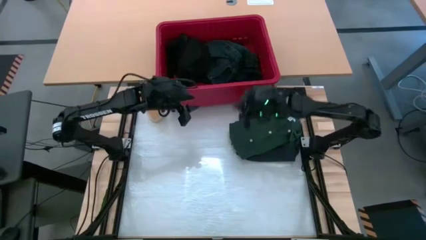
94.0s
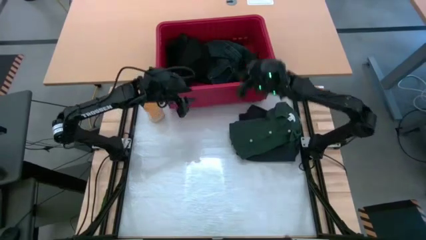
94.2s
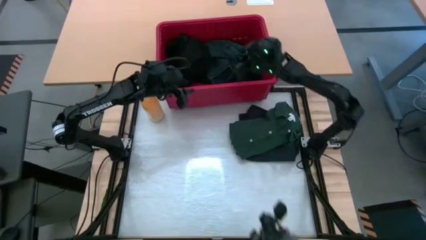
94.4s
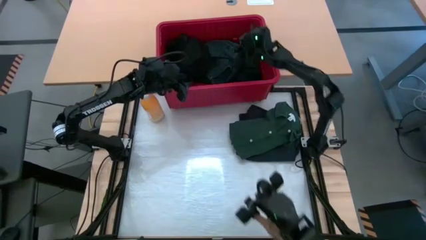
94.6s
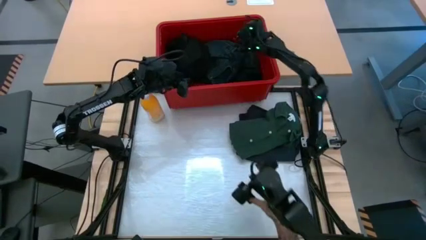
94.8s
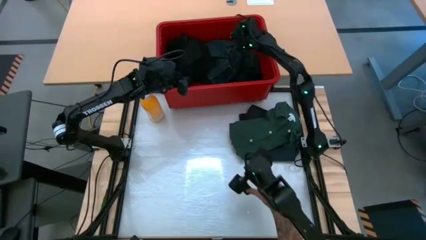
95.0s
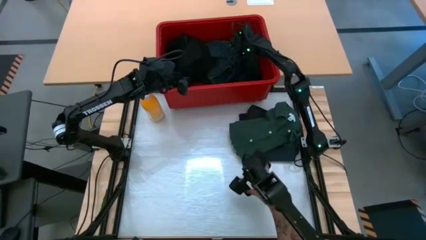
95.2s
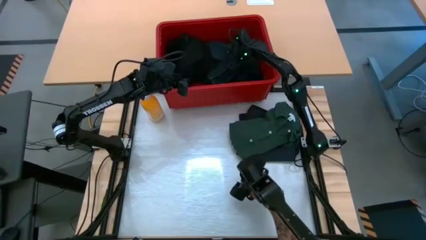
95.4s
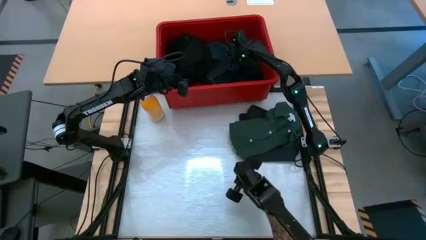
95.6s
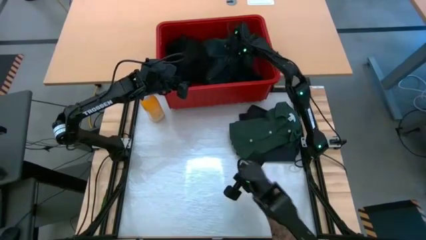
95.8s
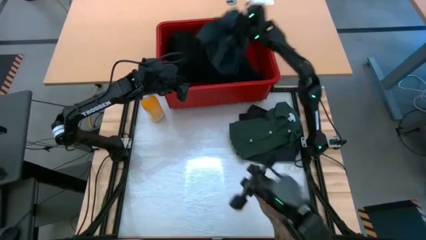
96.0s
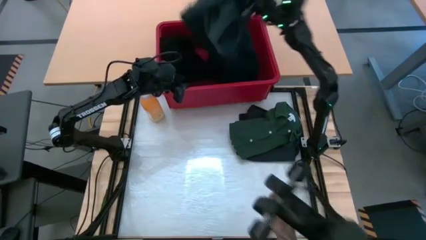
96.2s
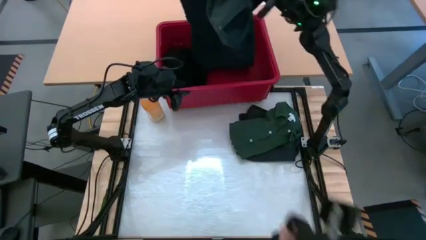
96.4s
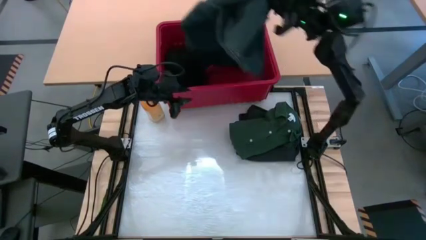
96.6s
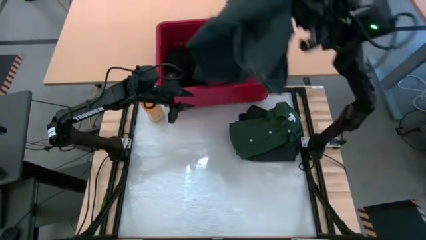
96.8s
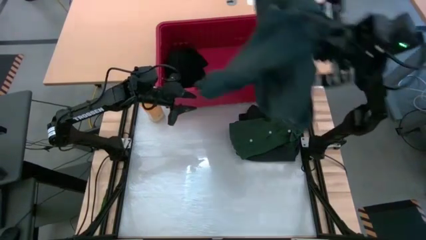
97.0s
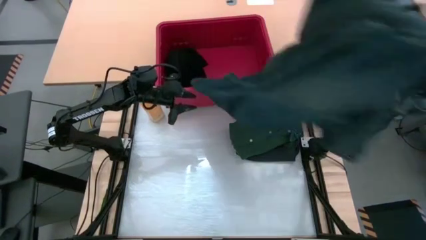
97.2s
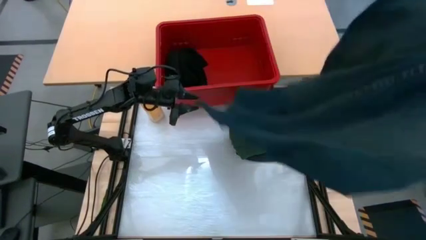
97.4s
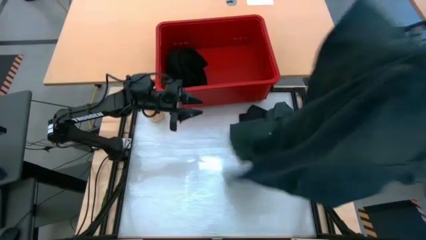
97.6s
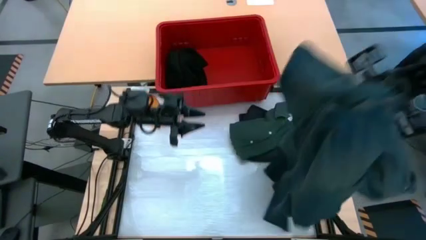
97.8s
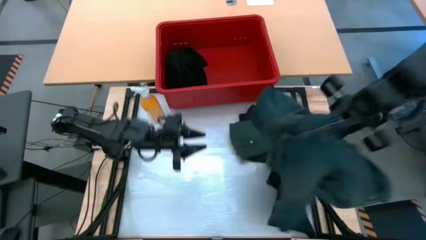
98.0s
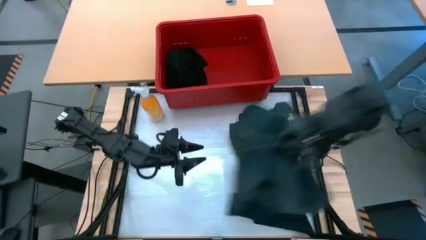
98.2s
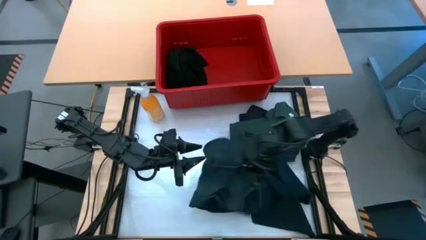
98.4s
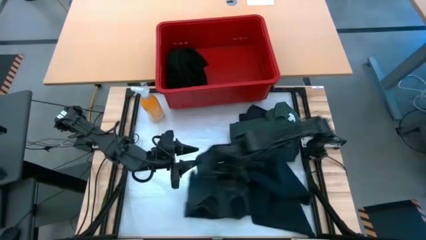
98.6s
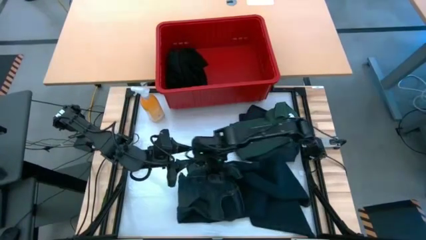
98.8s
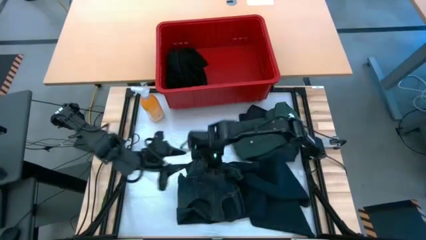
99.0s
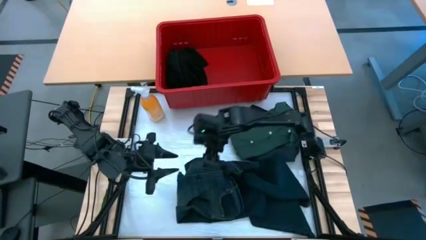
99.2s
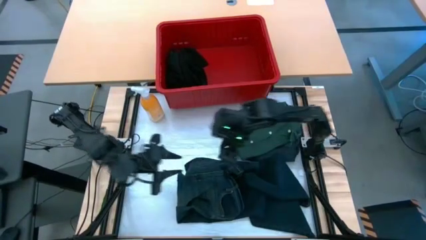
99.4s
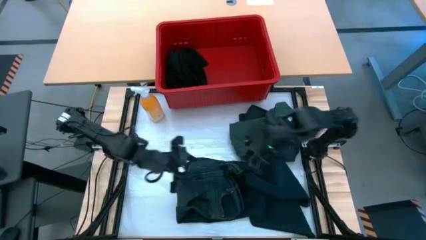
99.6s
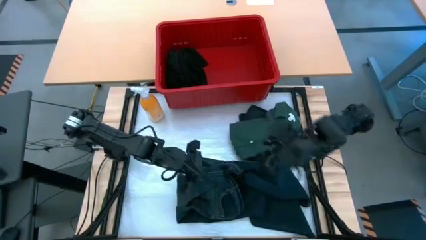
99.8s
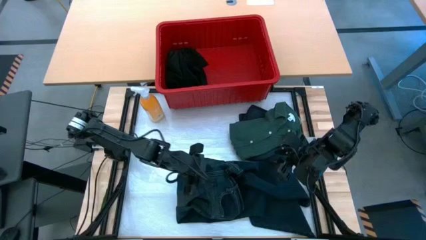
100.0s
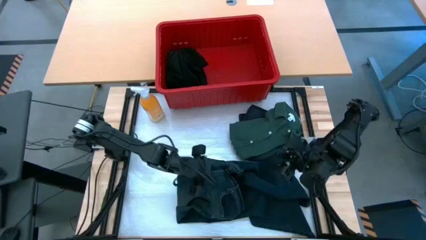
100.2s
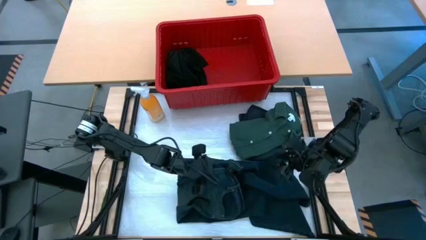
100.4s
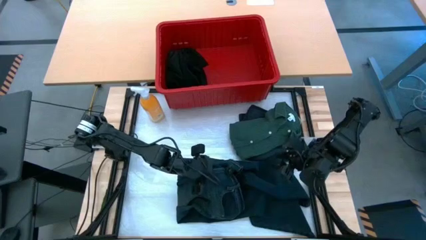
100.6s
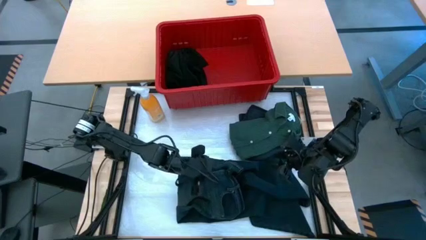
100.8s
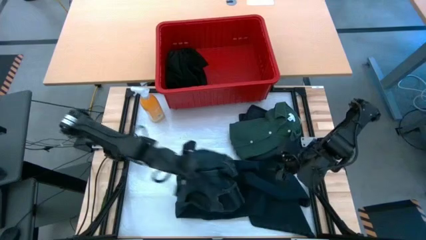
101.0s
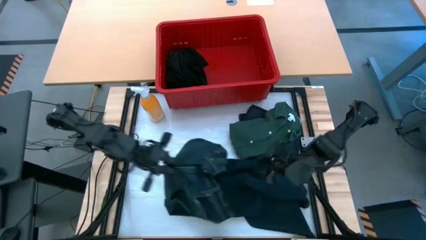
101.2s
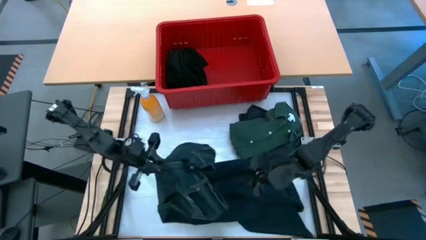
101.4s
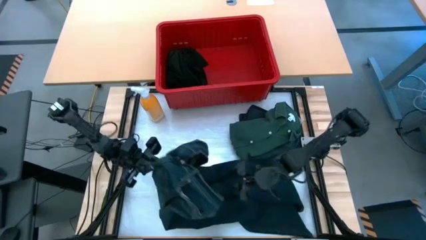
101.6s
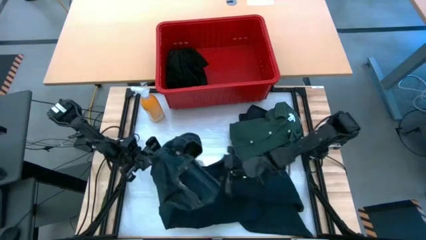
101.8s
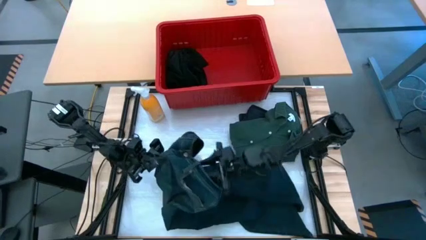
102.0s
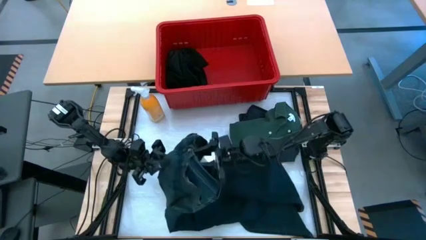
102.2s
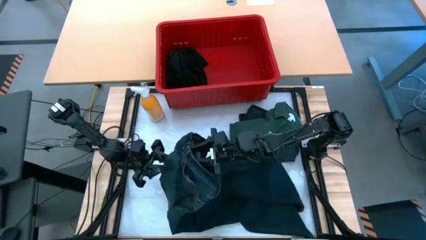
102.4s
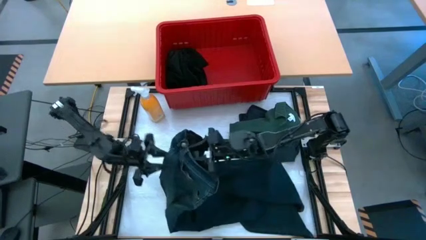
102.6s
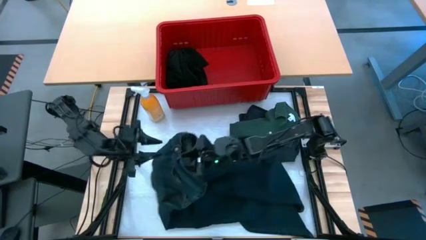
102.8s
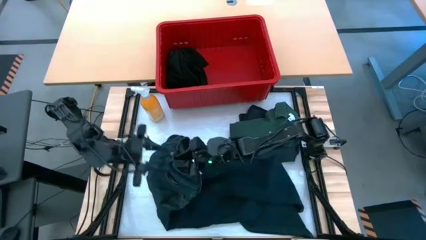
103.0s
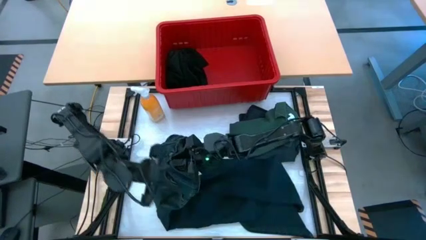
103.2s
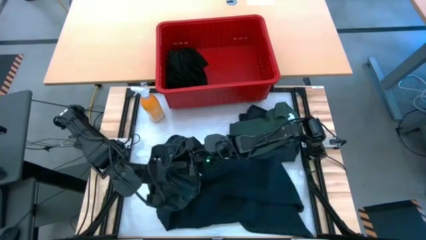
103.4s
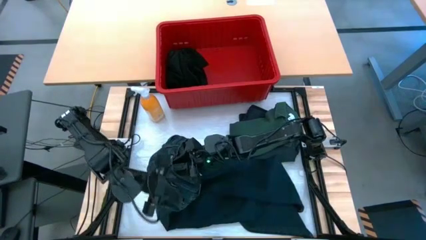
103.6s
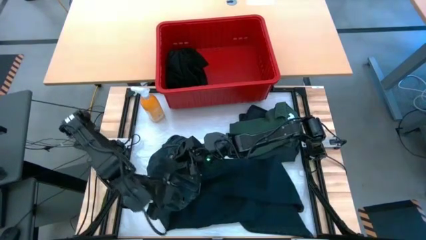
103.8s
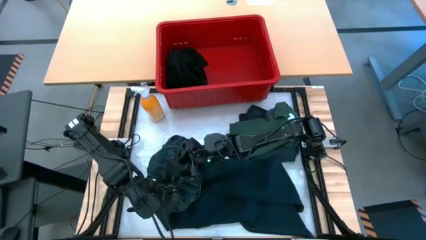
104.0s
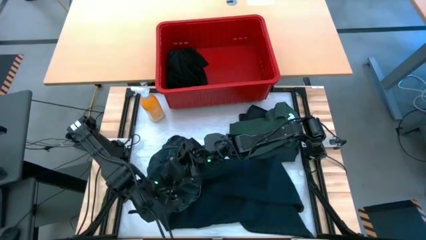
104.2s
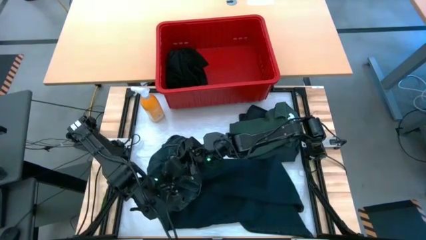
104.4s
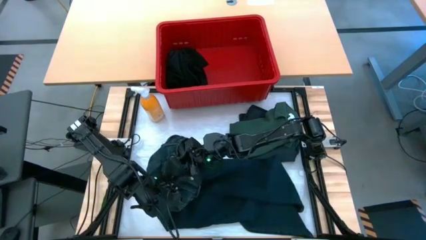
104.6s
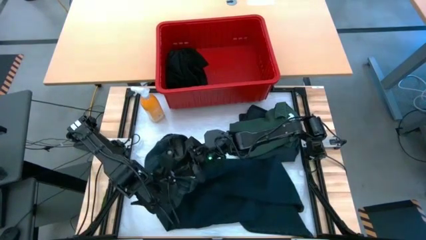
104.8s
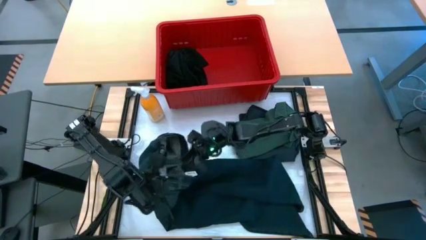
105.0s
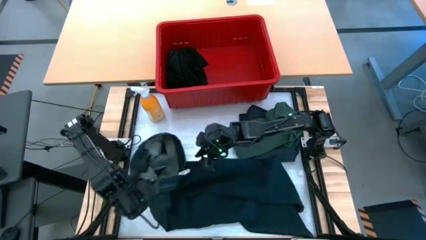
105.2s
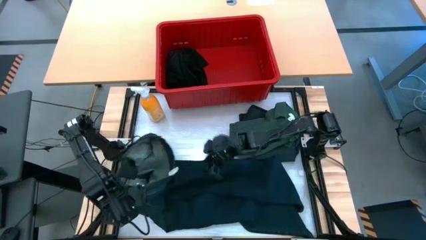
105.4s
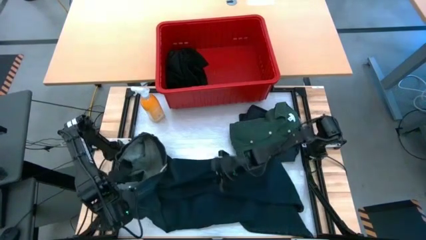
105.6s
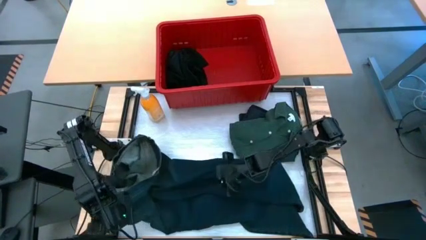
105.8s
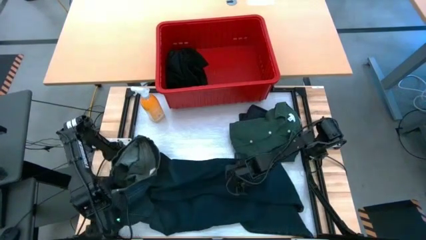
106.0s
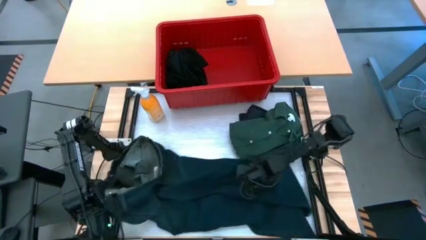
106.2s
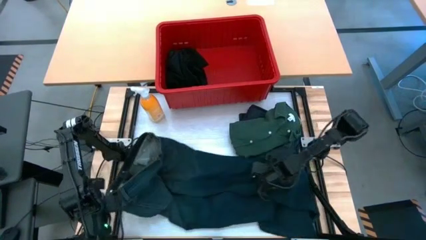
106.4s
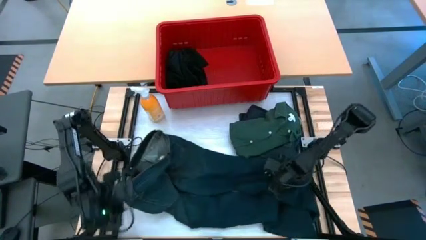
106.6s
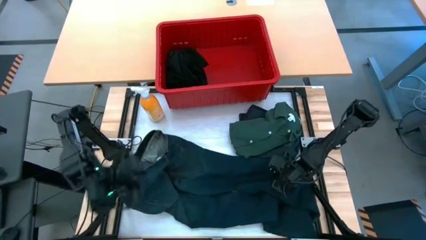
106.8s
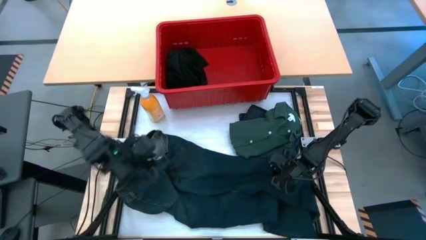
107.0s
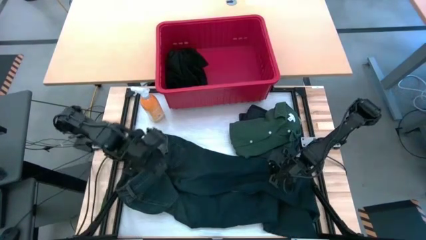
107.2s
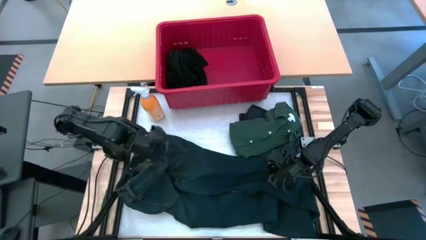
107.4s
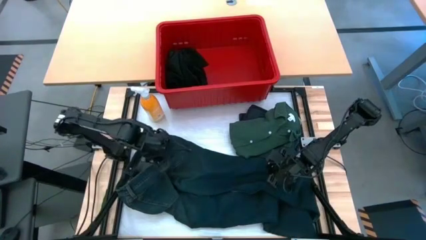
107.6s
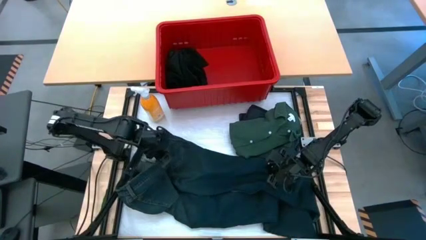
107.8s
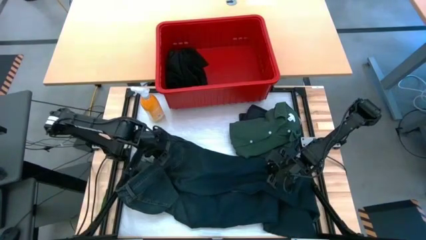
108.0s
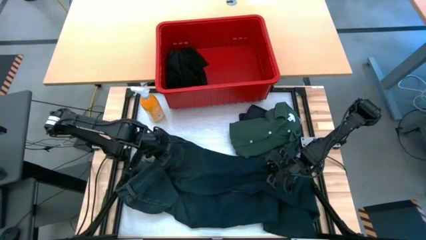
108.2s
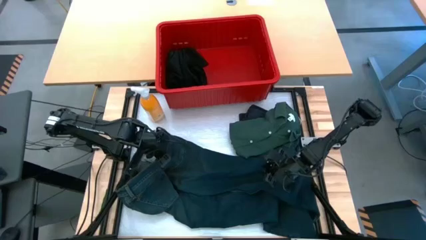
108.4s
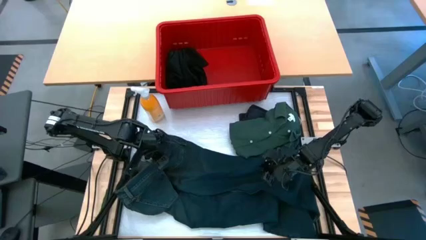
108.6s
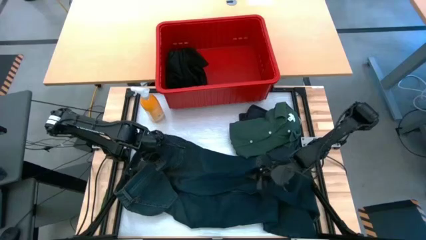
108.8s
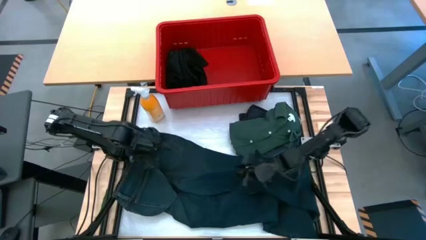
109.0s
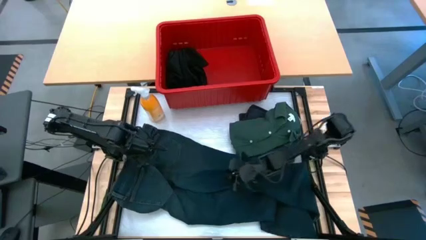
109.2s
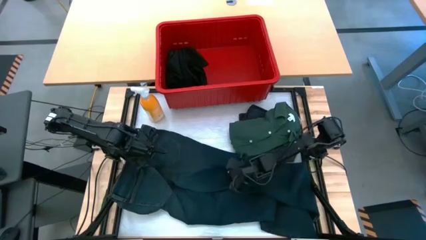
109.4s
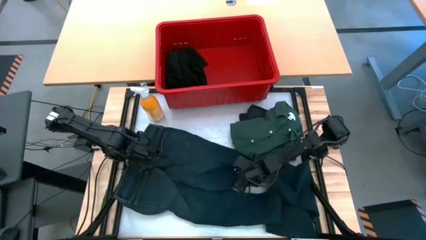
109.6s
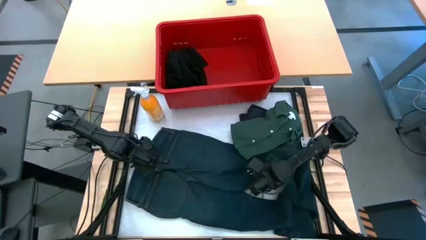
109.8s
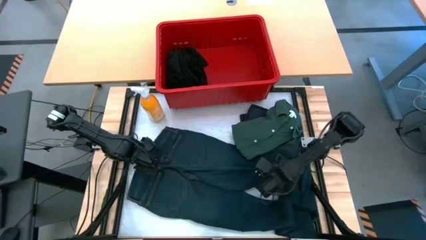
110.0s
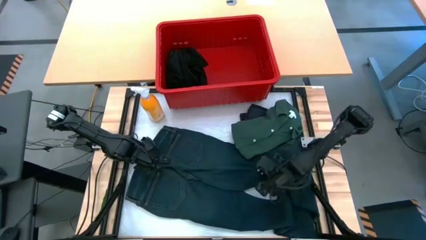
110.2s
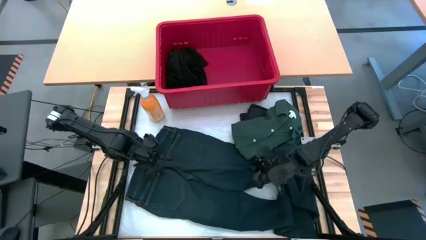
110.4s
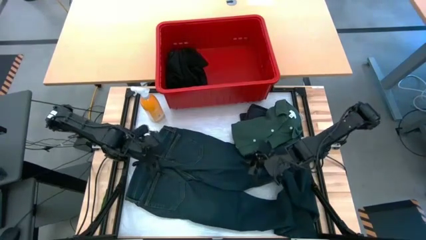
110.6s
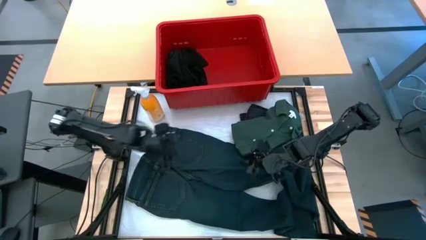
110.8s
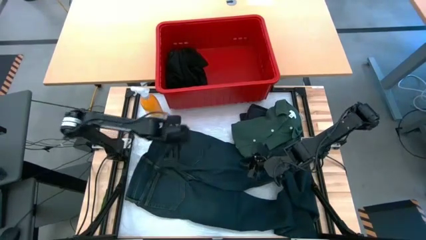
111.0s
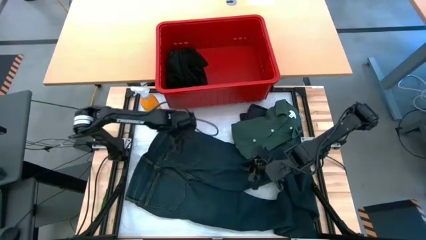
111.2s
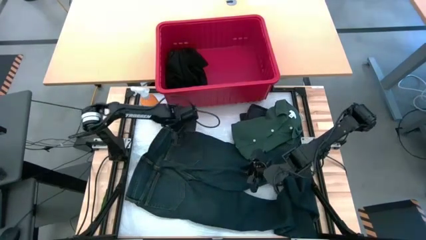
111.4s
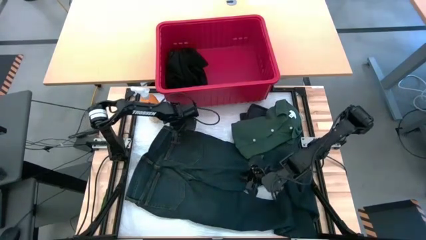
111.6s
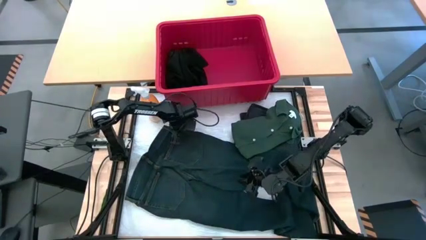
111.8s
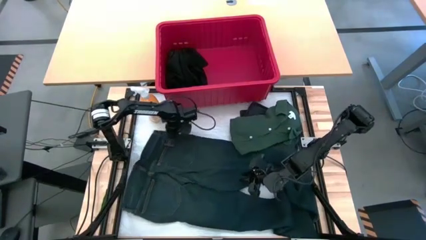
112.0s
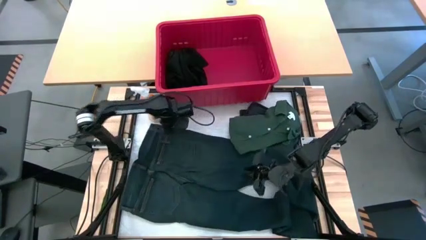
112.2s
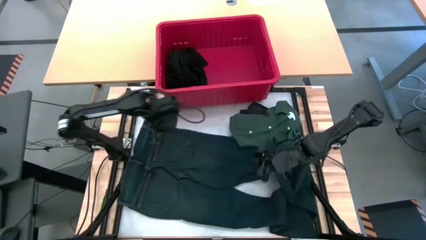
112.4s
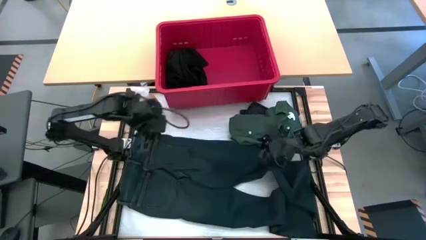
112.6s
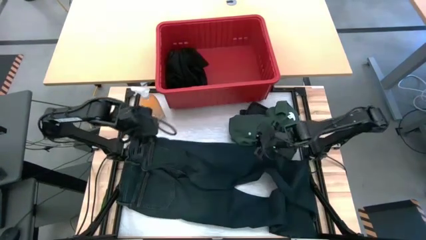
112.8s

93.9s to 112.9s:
Task: Fold Laundry from Bin
Fold the blue pants from the red laundry bin
